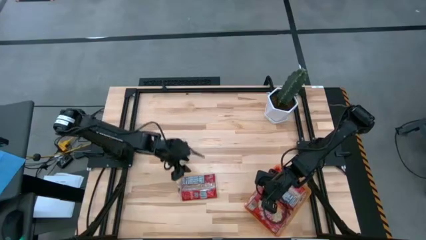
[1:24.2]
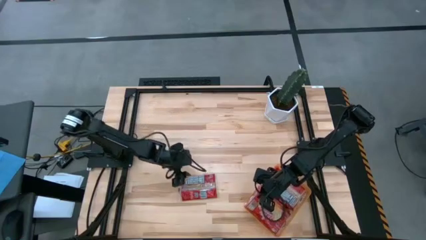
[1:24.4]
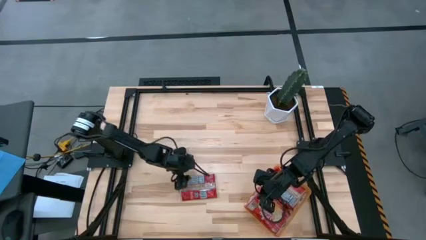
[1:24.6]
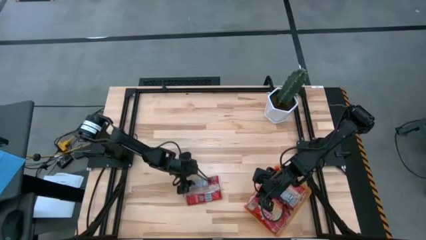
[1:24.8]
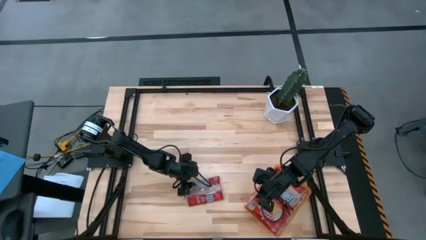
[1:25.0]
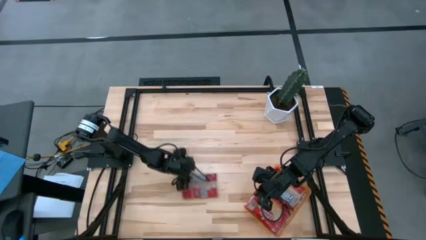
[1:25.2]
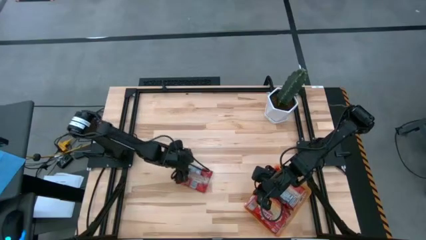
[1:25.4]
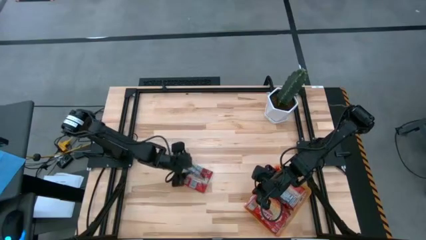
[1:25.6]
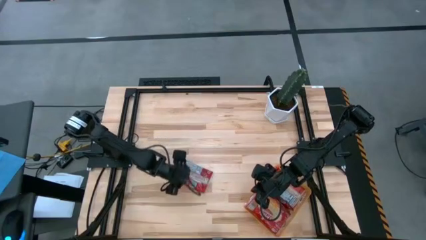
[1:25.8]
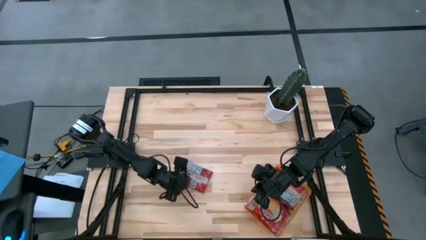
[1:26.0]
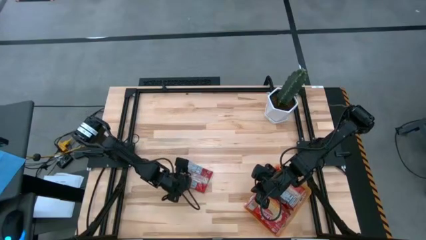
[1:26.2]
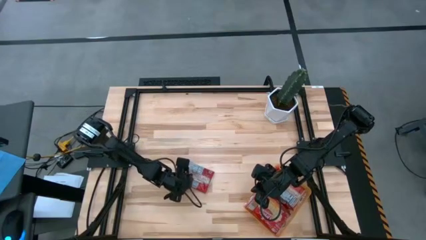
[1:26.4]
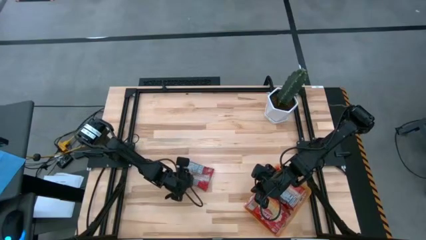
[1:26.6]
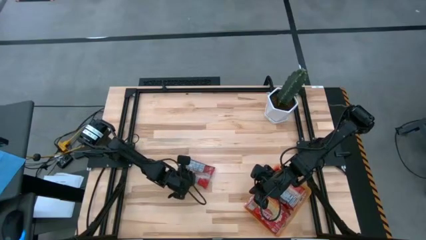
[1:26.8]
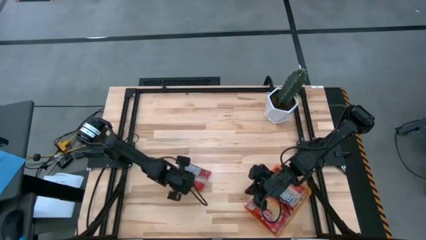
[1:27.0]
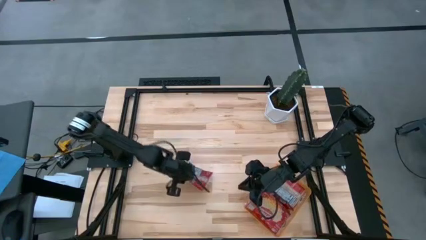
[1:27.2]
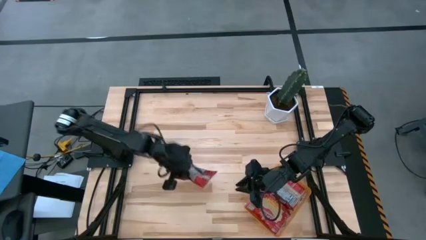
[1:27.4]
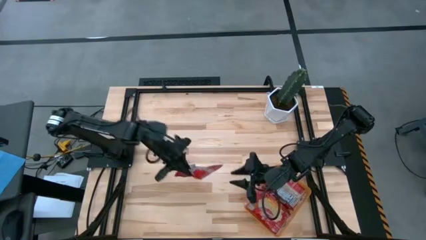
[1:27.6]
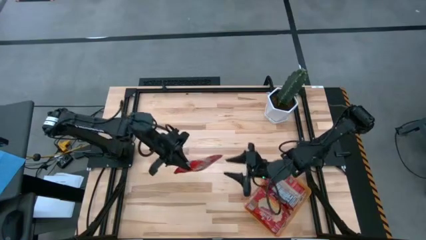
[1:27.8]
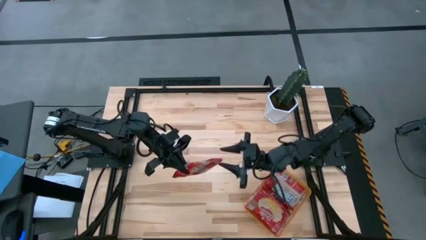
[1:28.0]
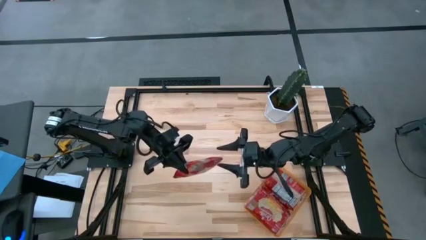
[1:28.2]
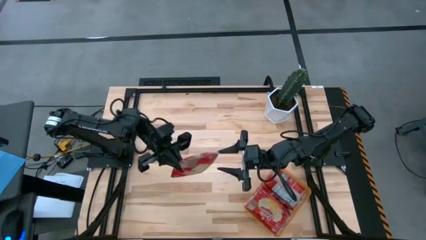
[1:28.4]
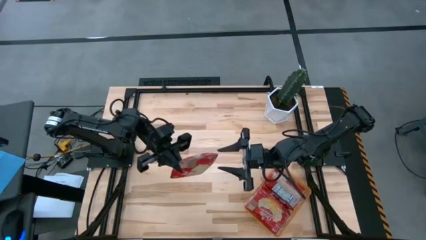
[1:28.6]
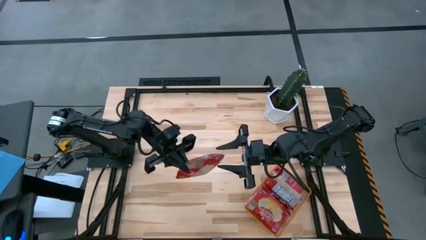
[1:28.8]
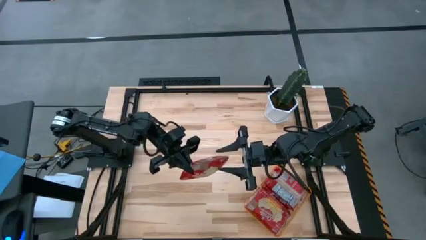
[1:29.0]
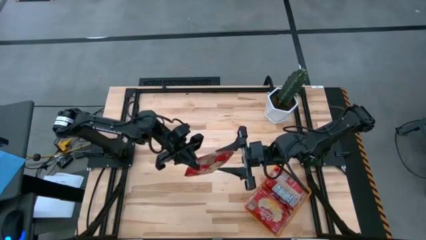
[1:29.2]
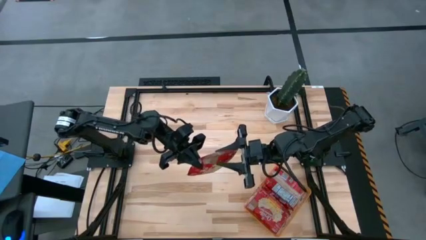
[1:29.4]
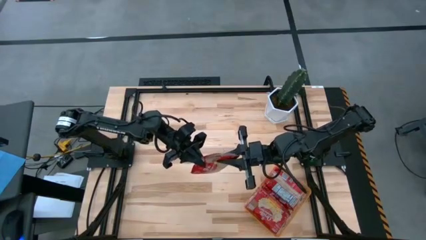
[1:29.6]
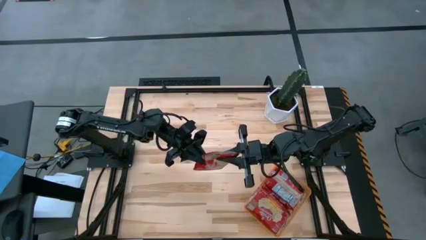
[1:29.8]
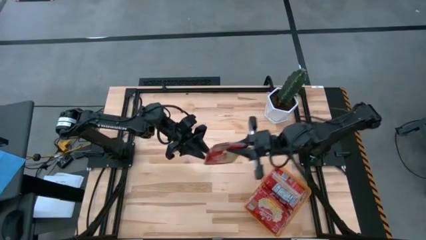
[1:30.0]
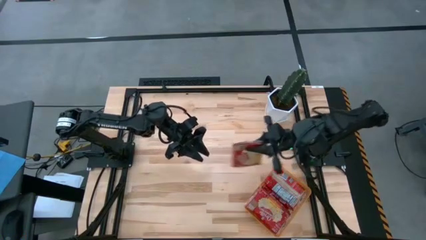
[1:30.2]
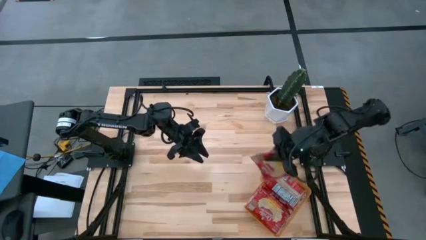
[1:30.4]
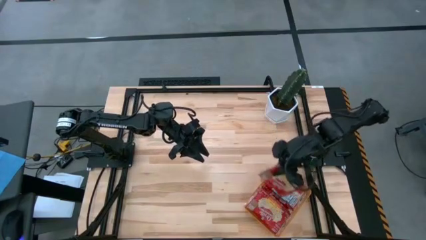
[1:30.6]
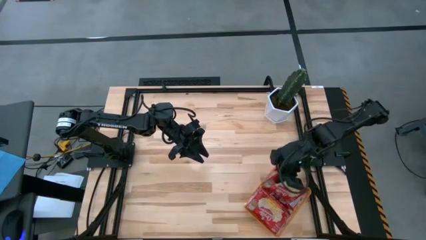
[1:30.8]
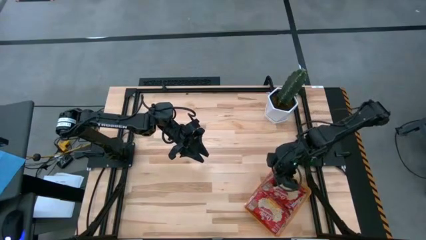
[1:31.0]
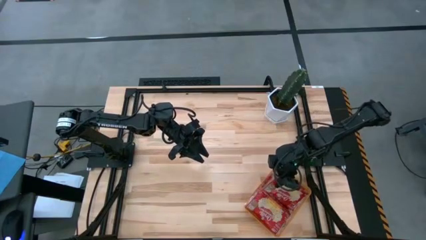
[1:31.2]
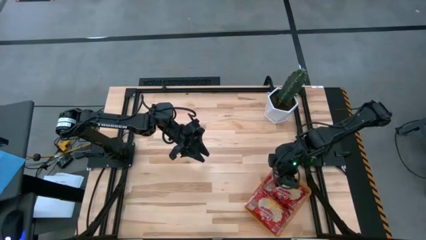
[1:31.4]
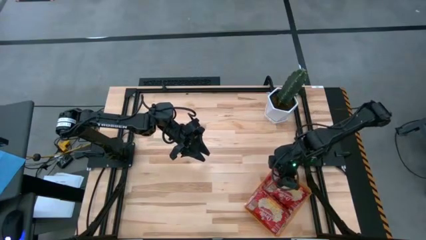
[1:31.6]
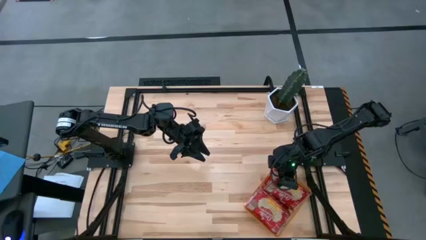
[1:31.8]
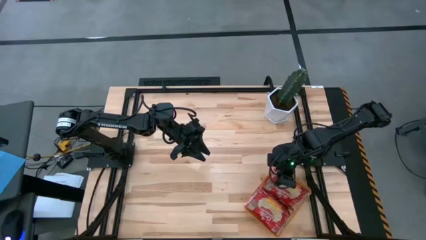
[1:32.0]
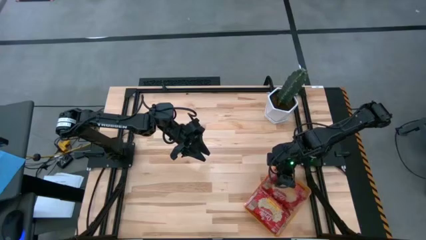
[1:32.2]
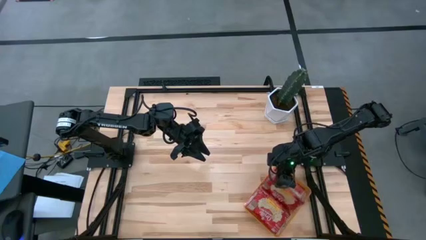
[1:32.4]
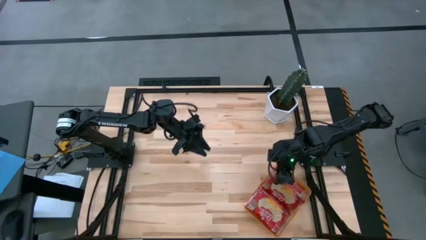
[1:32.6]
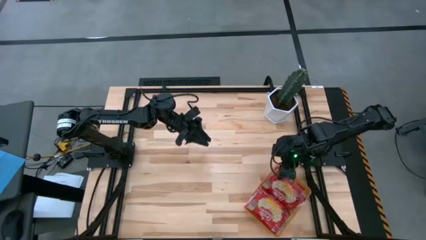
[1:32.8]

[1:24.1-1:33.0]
Task: Sort popcorn bags into baskets
Put the red popcorn bag into the orange bin

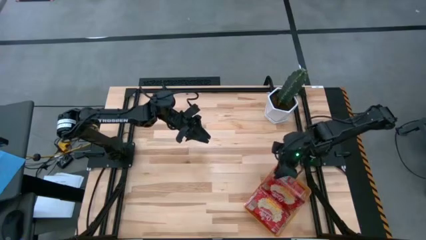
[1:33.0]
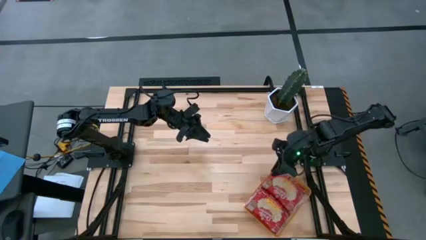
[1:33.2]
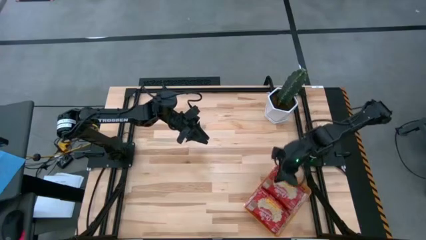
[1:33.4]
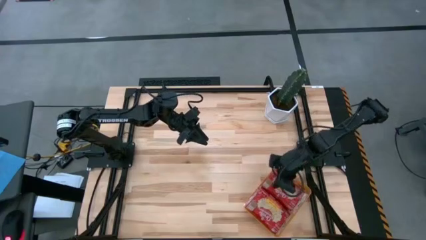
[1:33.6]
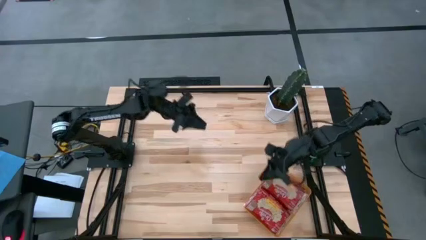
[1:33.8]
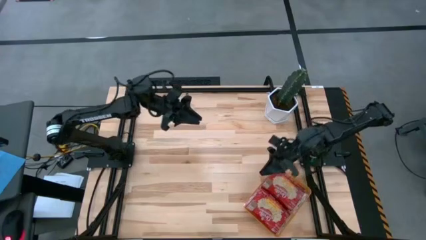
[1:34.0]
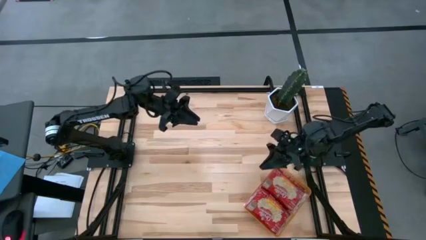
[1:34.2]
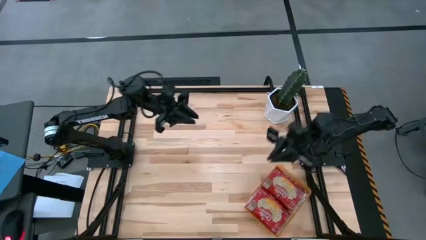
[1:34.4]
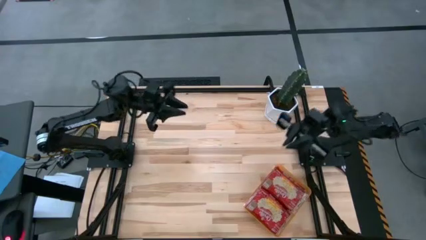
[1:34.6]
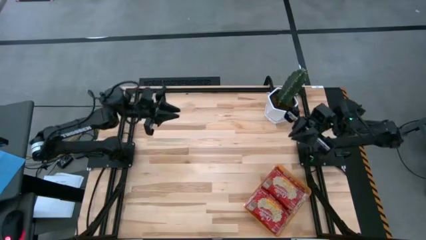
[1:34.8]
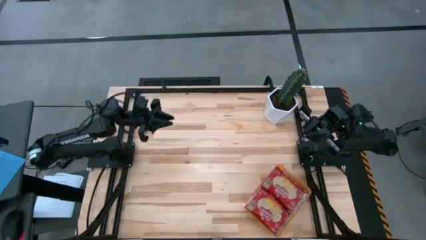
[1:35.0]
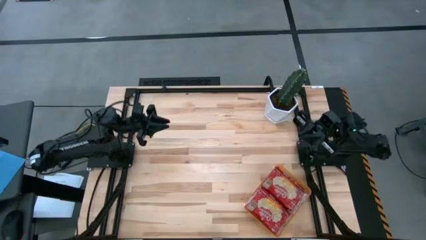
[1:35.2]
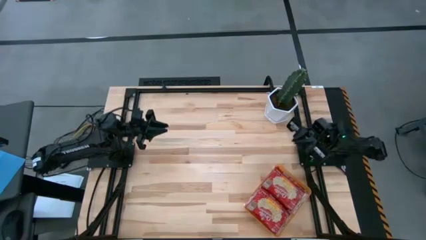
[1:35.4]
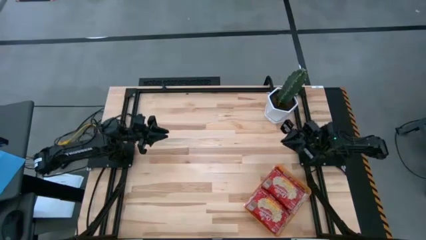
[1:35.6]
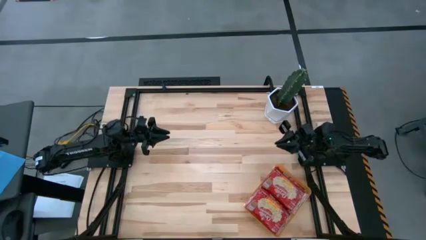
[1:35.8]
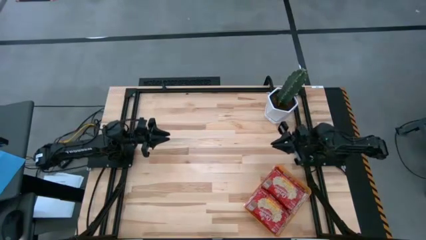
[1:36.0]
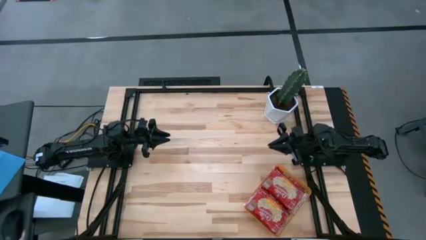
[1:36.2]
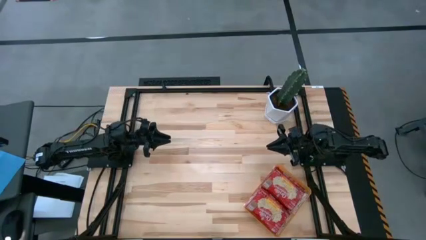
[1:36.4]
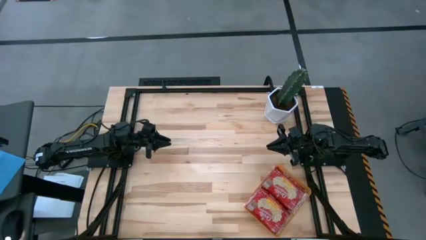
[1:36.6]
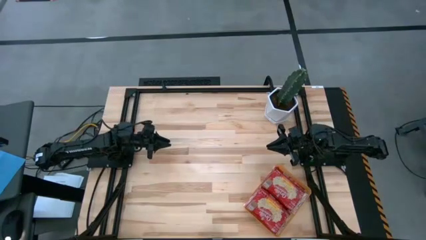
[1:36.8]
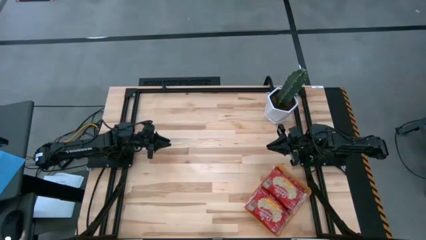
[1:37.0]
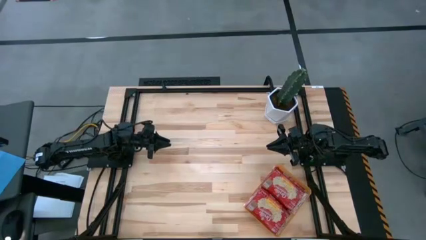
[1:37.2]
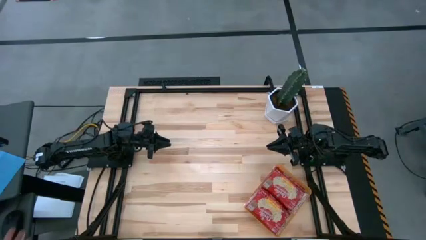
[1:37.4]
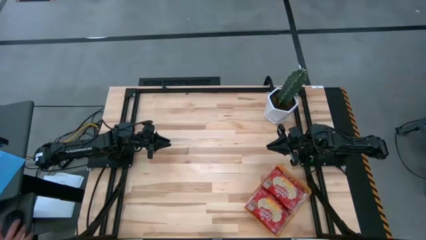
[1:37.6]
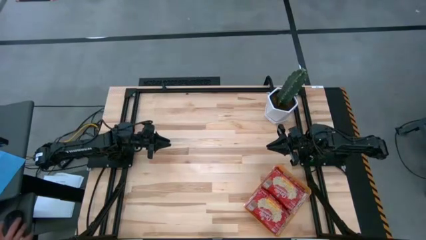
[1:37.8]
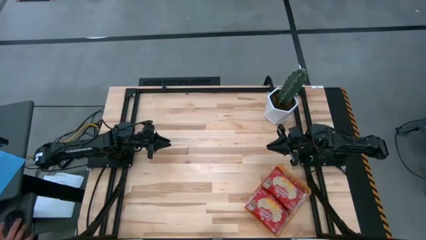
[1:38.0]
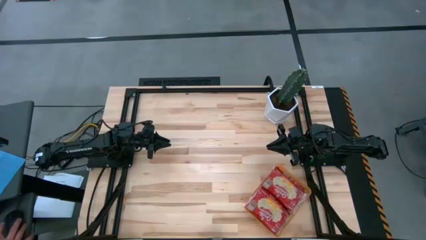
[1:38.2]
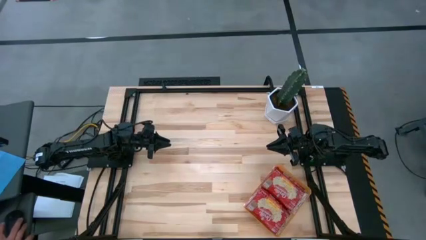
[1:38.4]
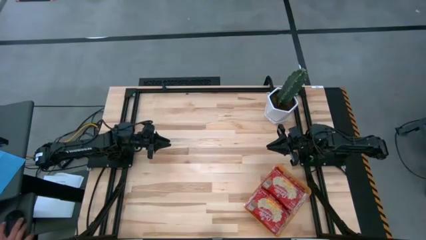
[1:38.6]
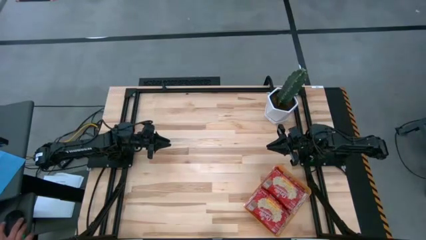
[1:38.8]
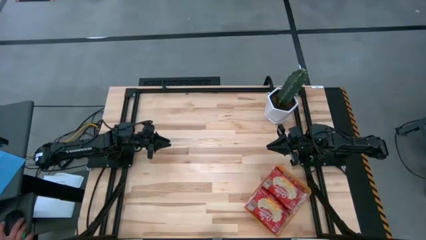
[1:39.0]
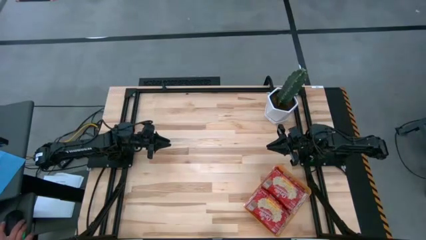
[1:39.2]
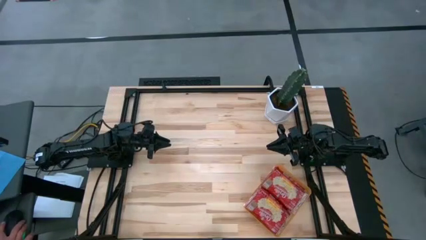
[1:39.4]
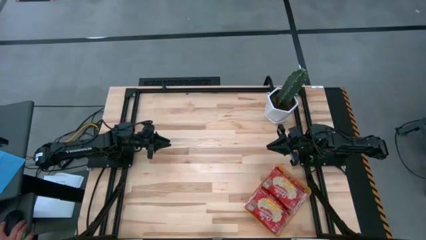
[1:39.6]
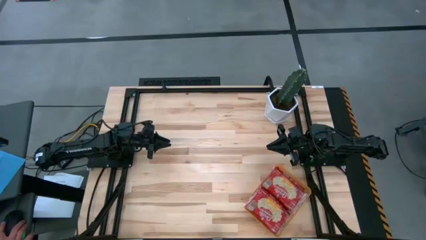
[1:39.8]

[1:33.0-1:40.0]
Return to Home Position

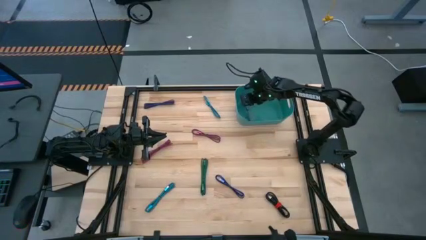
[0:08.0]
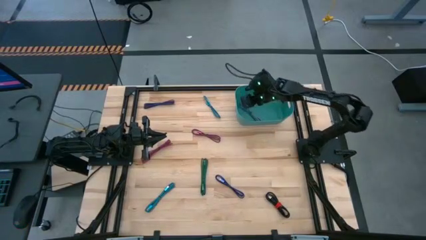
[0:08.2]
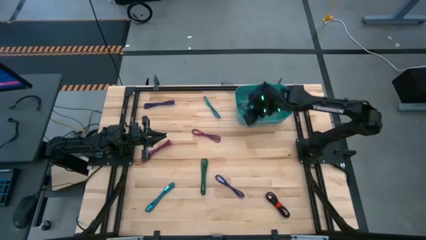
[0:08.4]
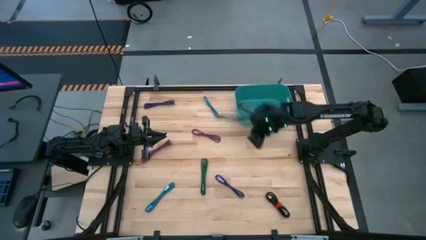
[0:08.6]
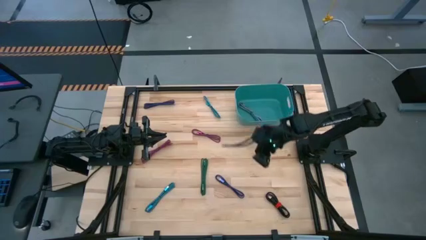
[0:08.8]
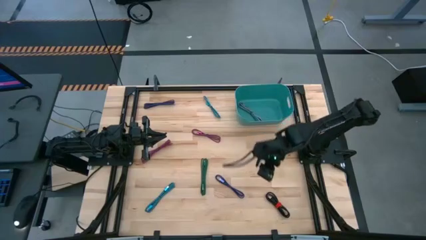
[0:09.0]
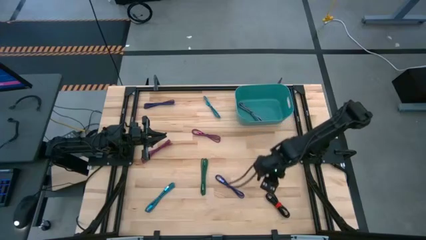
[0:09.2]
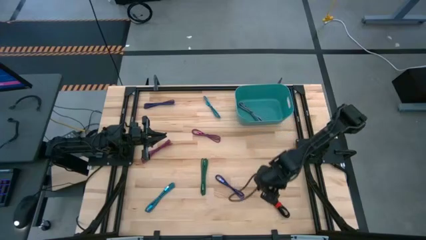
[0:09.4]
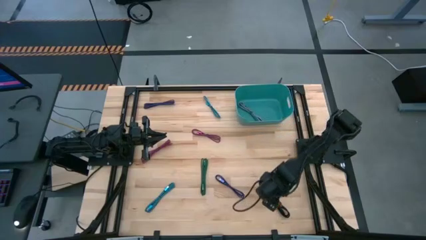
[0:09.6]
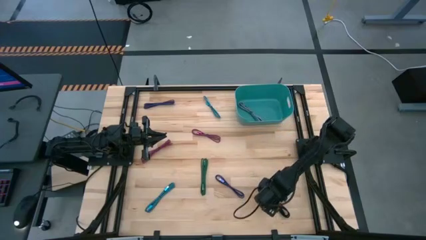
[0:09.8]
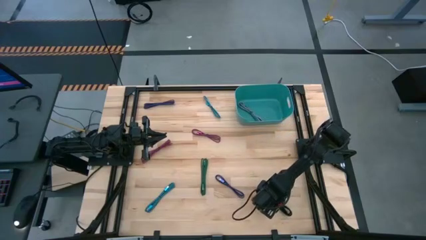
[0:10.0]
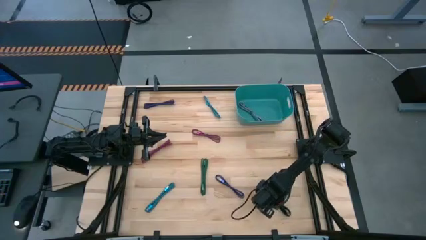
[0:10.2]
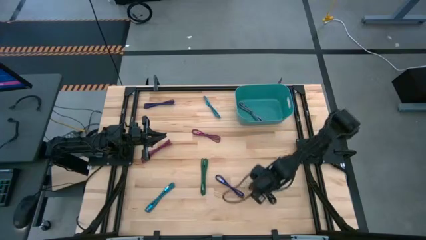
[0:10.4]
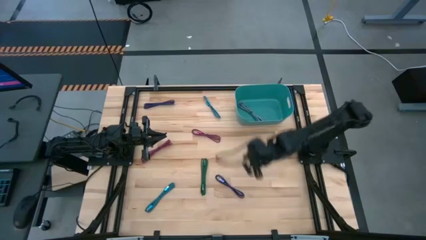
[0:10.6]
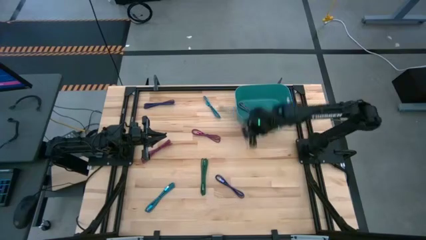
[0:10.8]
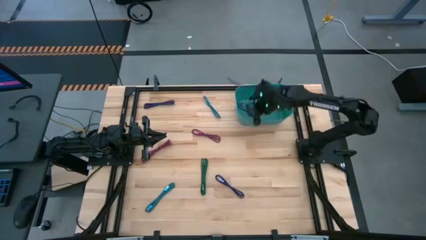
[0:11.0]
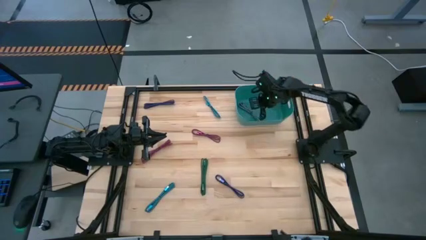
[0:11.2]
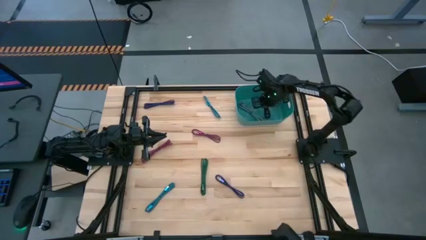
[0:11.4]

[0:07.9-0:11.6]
Task: Pick and place USB-C Cables
Put the black charger cable into the light blue bin
